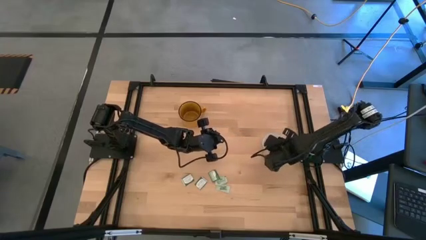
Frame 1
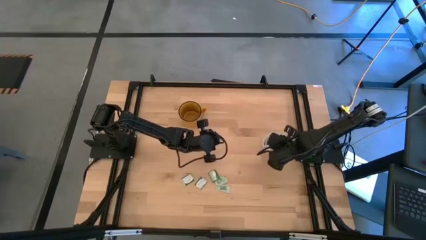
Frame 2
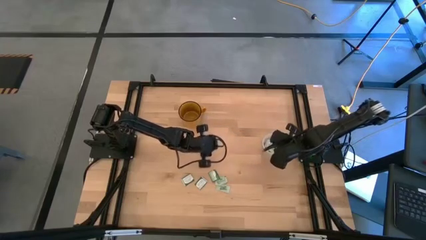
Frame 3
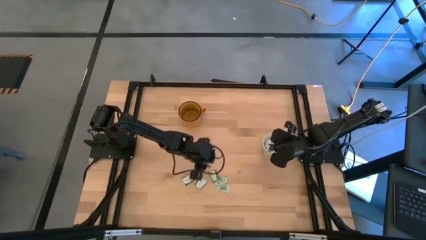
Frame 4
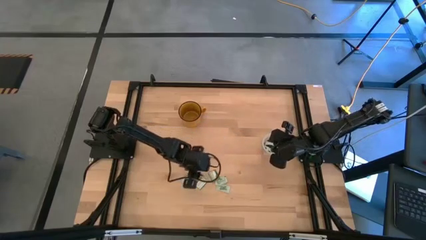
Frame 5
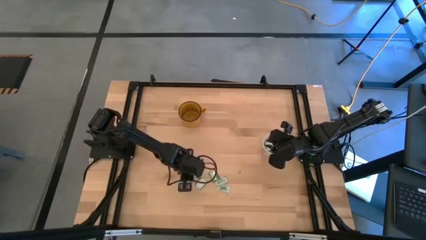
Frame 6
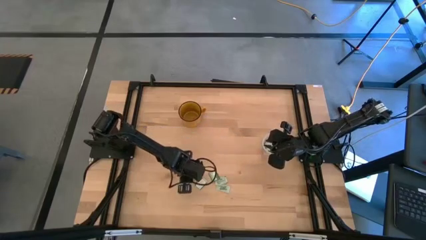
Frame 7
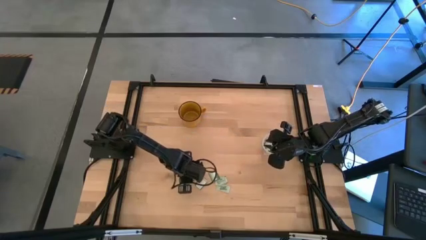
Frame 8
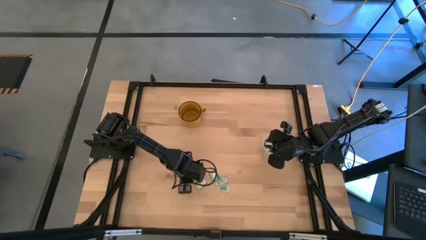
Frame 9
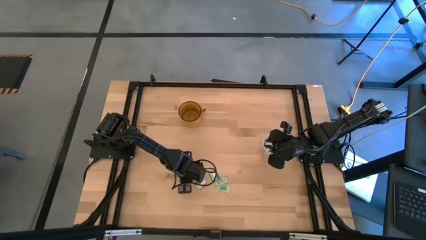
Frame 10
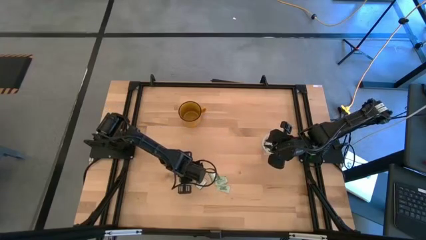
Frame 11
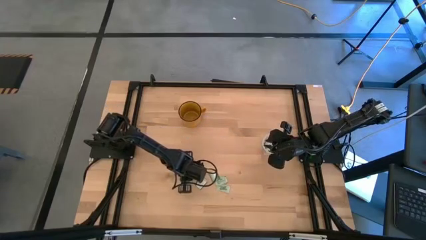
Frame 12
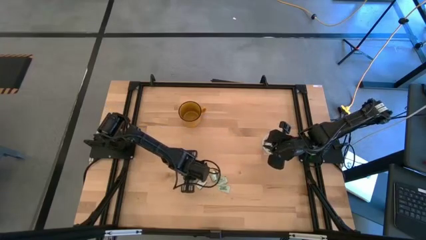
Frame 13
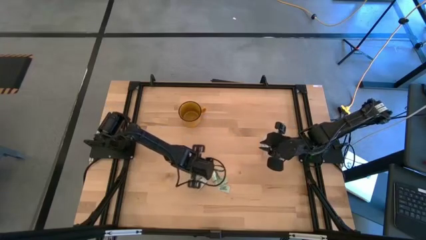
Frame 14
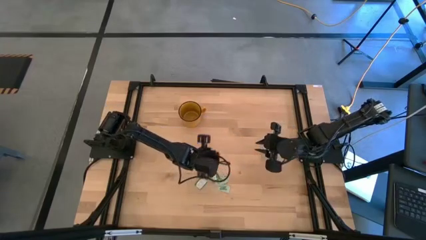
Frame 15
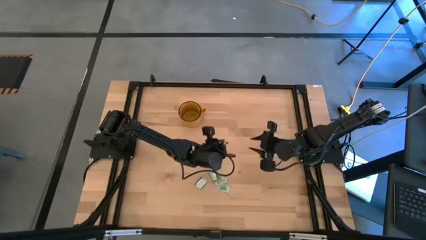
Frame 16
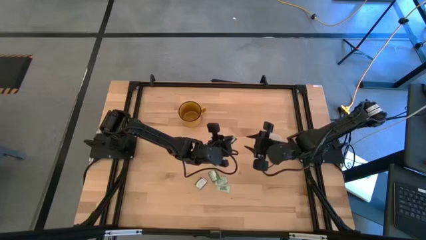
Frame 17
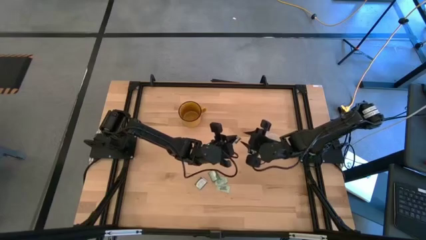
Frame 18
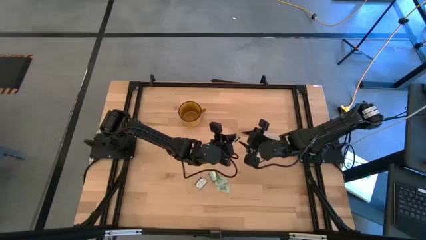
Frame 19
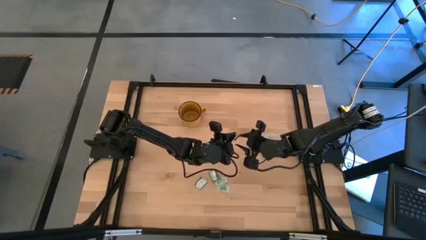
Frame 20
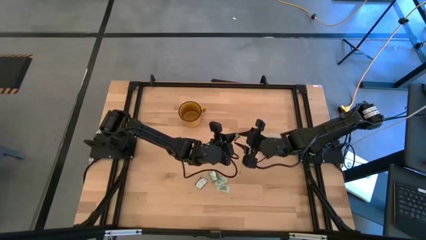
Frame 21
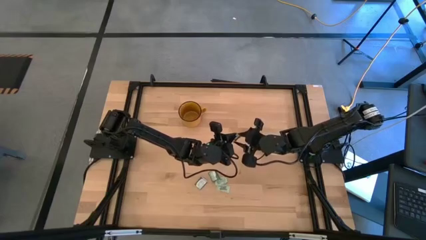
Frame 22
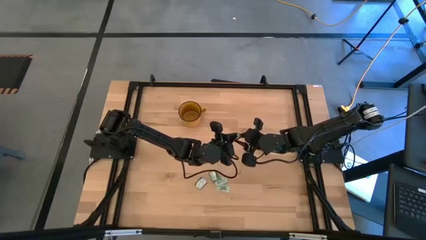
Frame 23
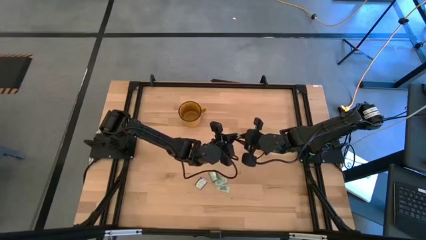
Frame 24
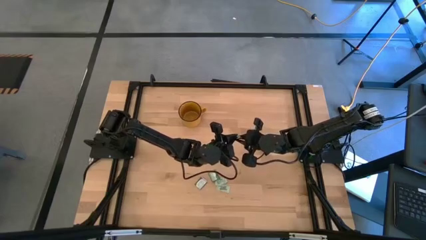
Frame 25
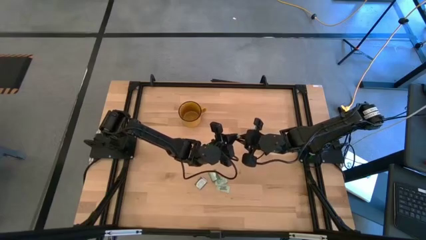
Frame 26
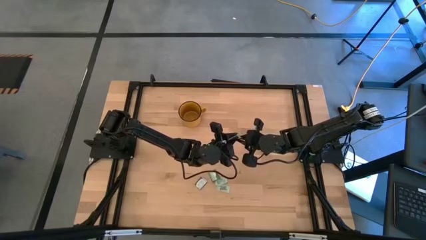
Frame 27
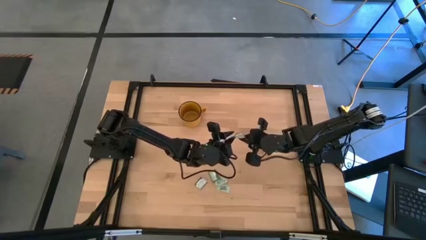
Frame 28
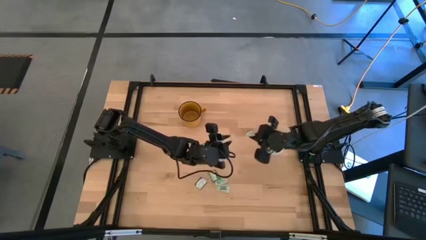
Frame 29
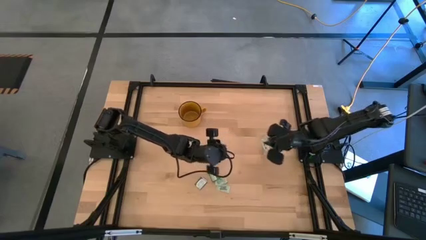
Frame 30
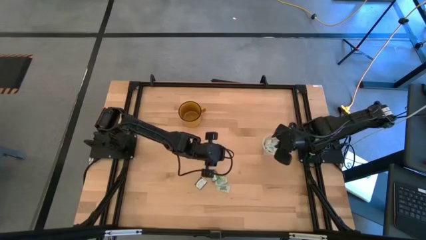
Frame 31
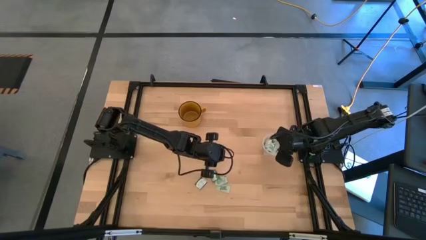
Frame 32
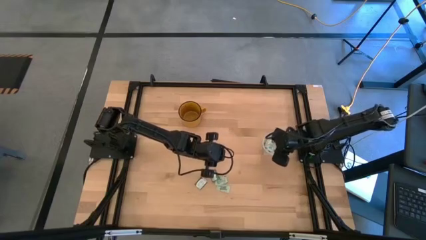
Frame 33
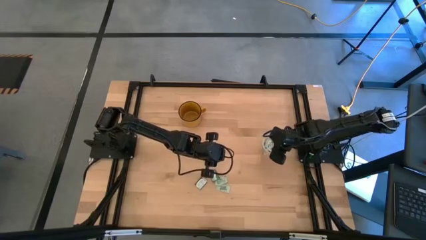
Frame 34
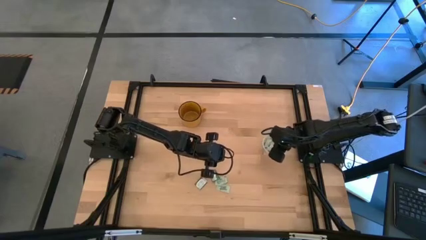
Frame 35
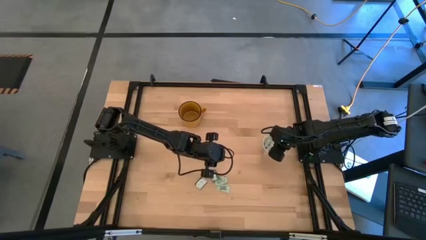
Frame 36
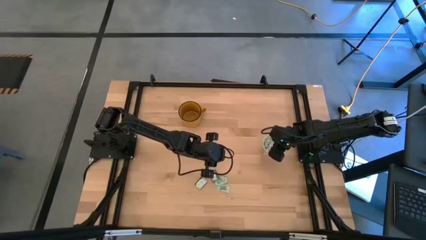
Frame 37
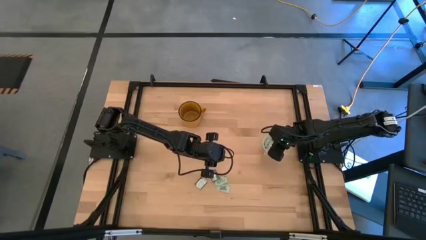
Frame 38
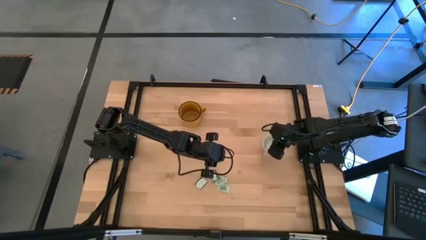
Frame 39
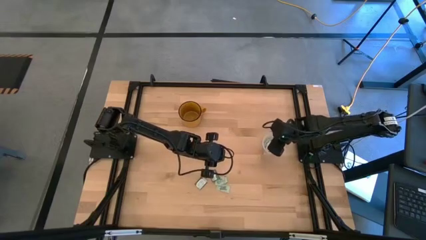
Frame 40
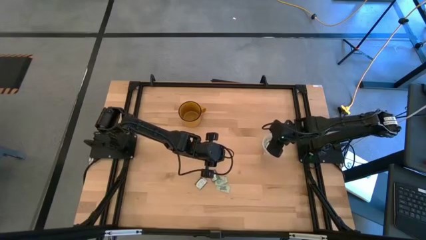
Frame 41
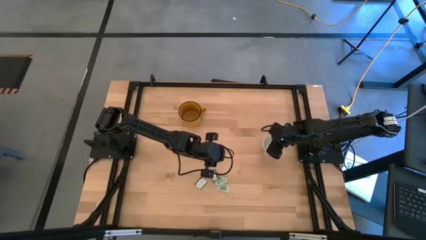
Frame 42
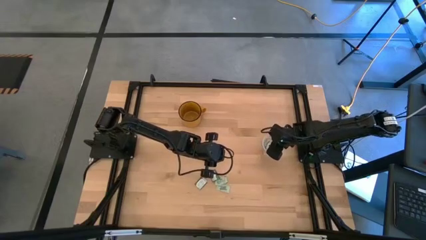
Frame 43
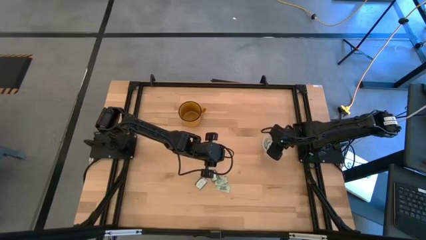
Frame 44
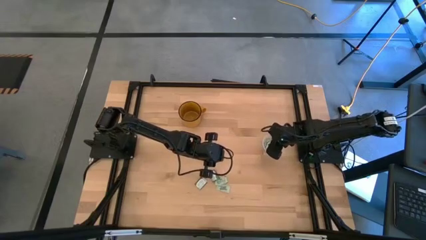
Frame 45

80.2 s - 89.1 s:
Task: Pick and place items into bin
Put the truvia packet into the transparent bin

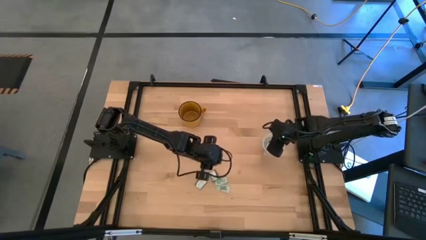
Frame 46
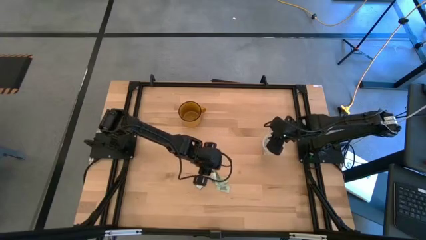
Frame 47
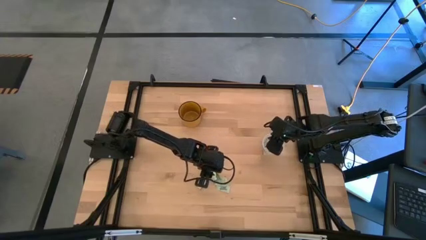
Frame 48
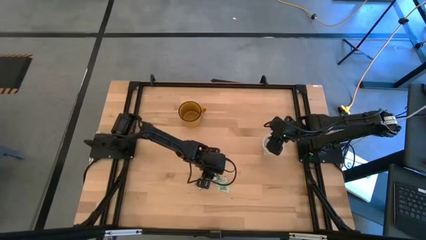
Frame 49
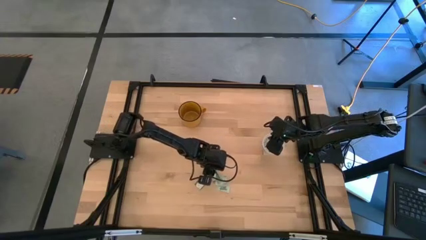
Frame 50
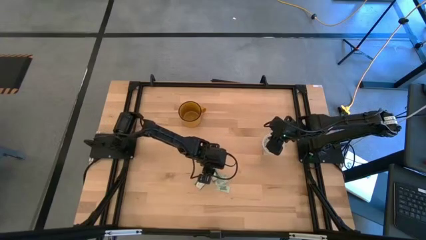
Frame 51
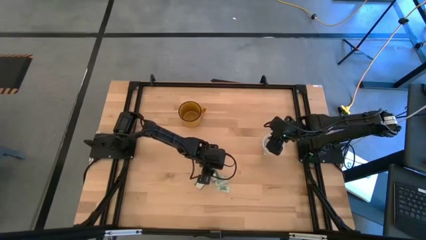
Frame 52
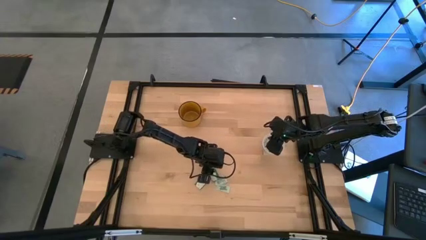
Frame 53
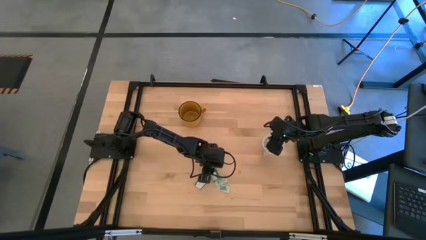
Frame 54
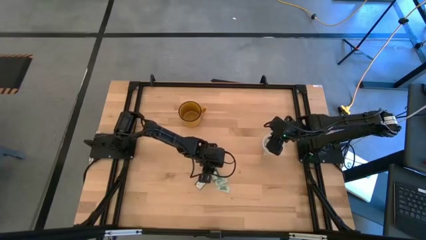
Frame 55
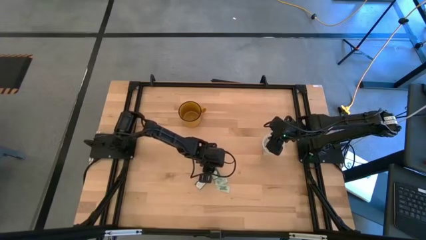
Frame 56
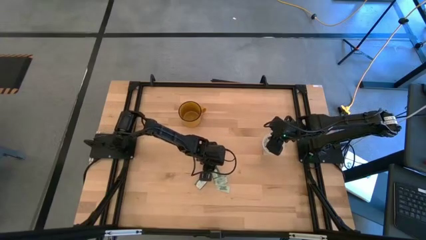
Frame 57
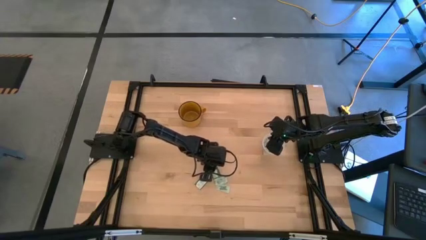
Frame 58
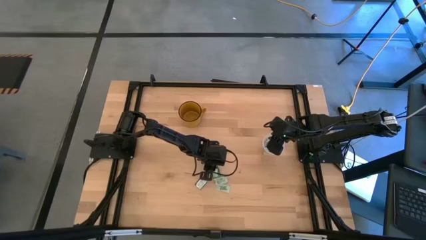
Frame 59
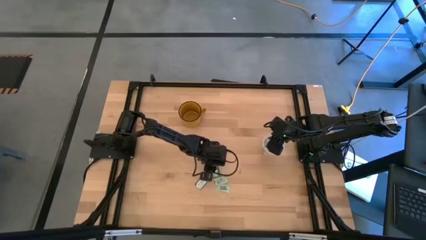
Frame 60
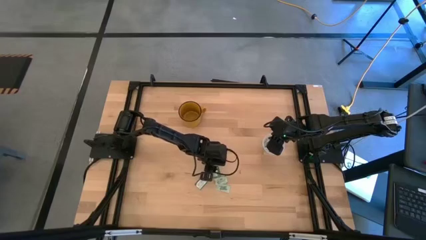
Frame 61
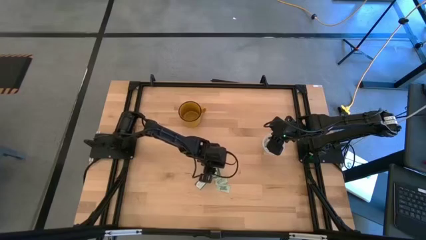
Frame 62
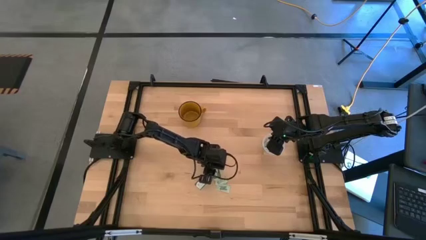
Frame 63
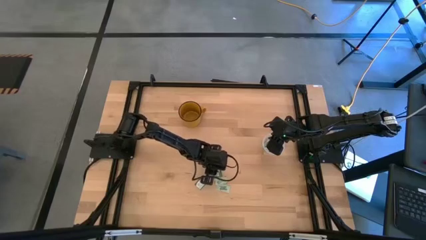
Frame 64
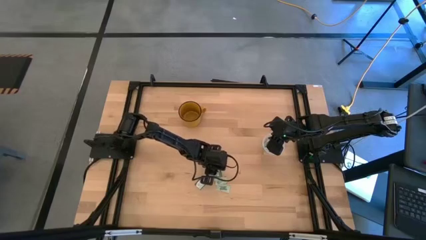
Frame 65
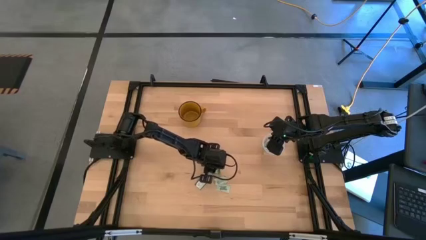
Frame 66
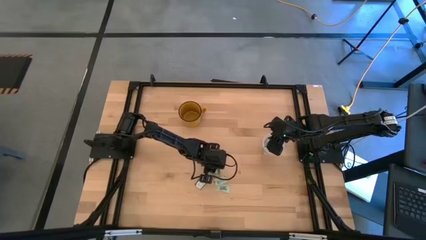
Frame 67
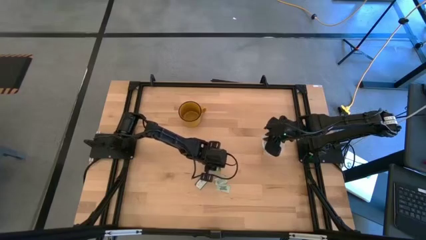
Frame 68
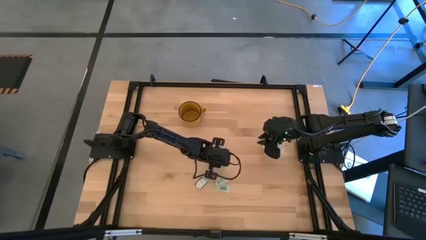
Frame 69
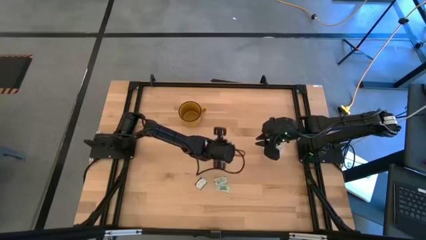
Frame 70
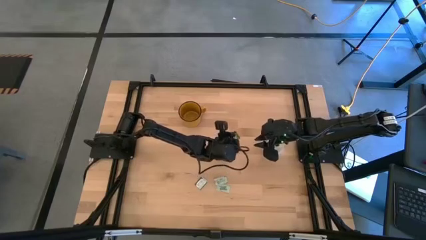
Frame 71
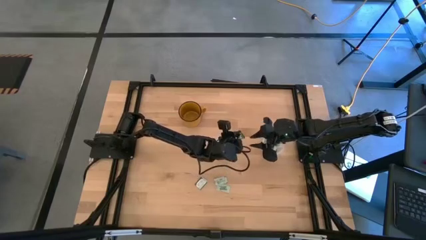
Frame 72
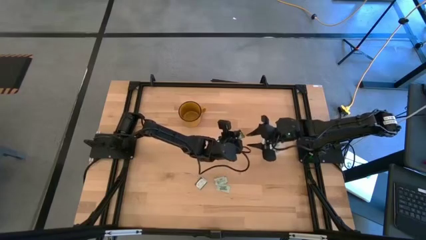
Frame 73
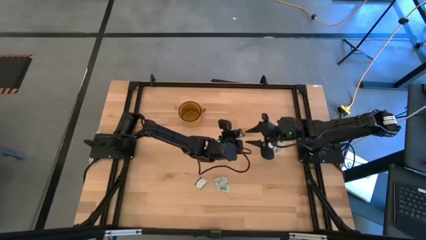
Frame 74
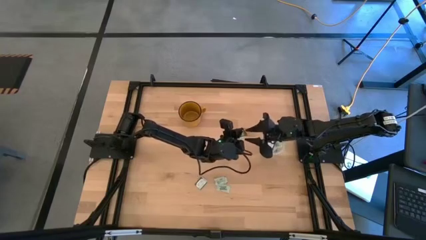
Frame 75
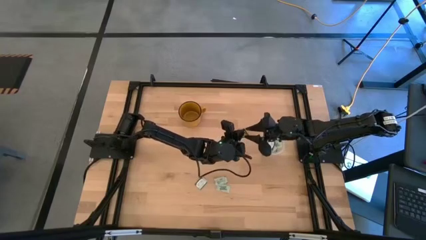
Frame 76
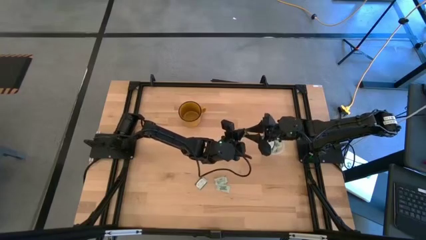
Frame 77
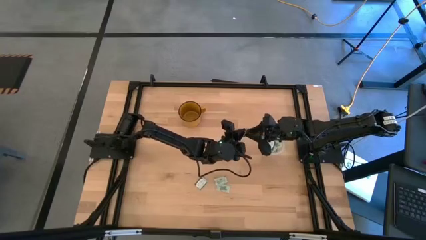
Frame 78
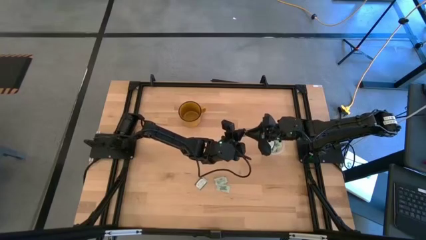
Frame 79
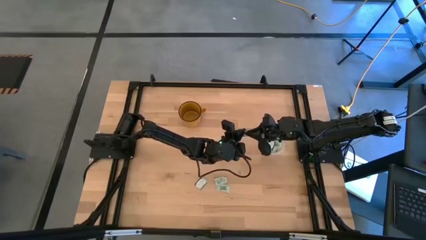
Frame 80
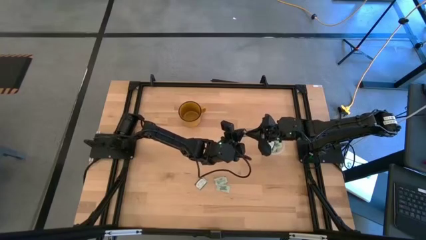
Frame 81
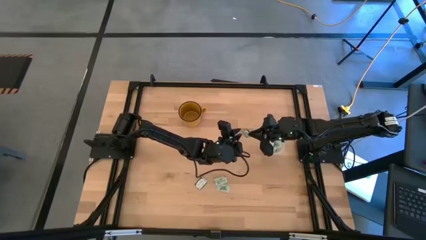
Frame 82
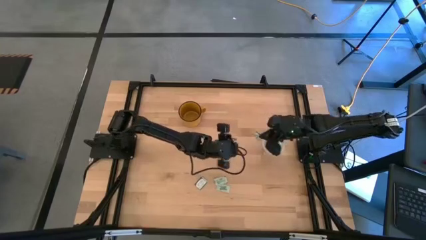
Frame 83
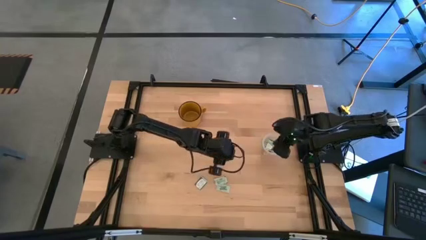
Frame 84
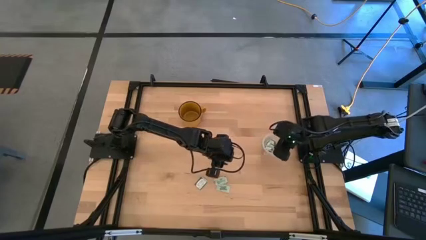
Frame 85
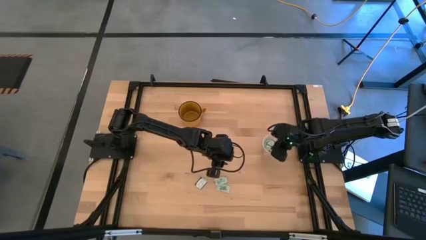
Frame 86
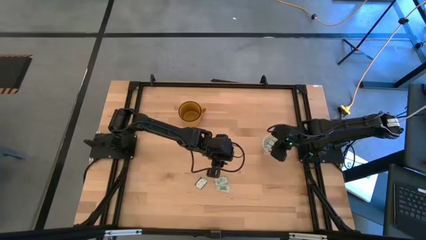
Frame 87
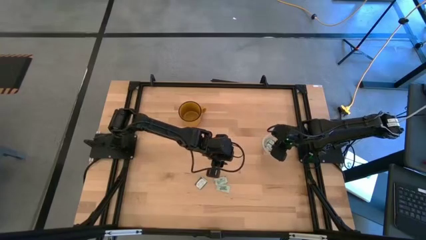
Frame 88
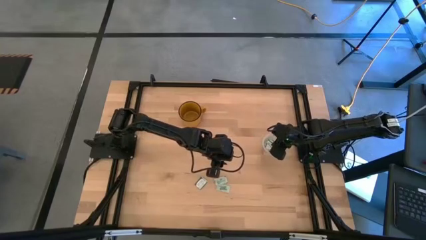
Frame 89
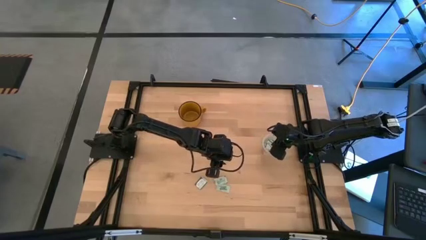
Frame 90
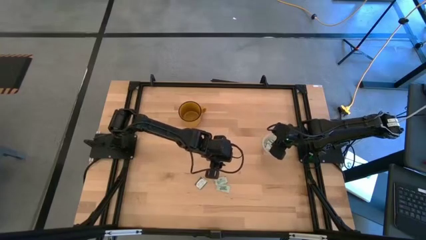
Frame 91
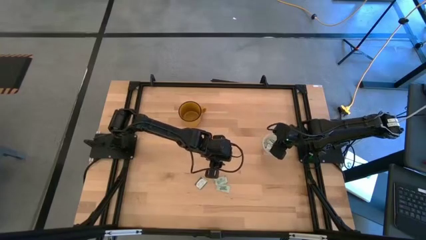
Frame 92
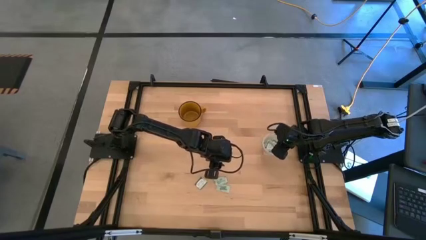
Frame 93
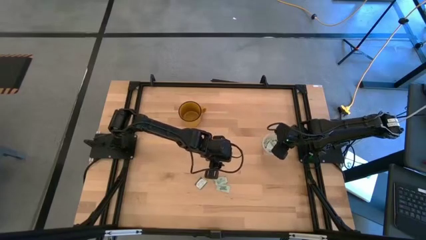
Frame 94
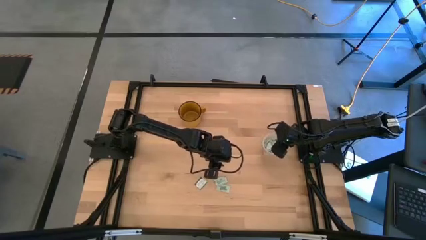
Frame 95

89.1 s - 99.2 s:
Put the truvia packet into the transparent bin
